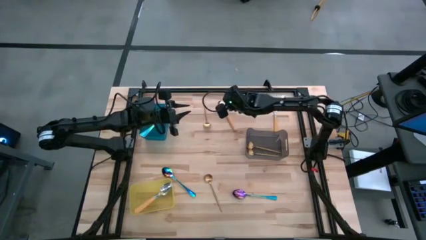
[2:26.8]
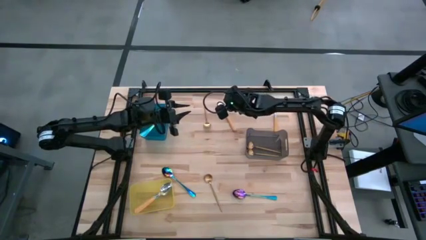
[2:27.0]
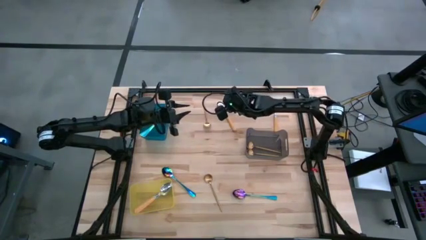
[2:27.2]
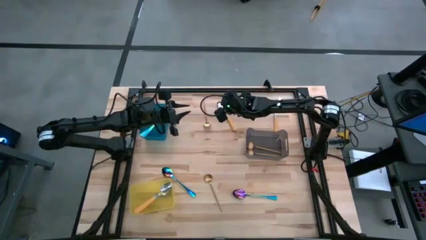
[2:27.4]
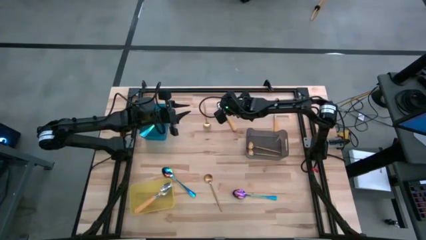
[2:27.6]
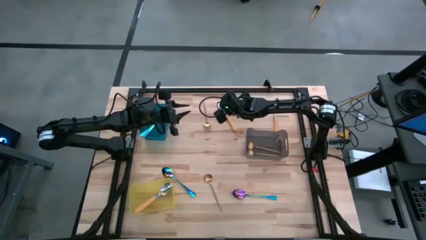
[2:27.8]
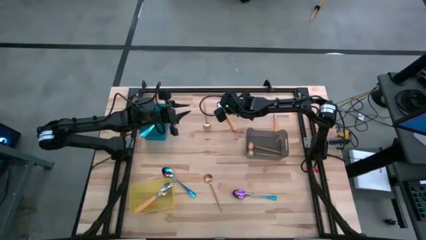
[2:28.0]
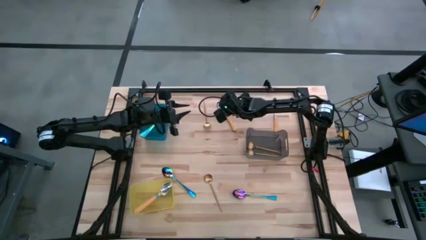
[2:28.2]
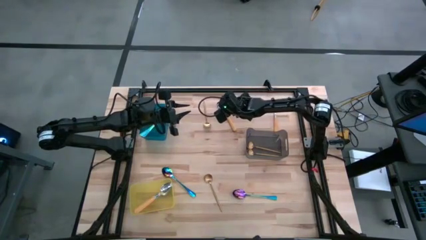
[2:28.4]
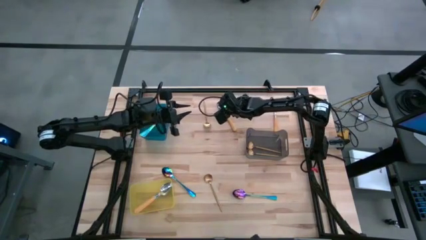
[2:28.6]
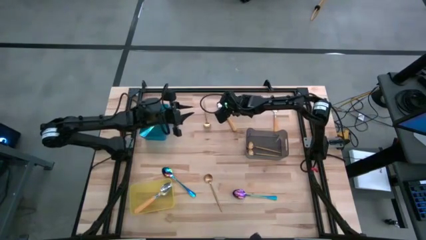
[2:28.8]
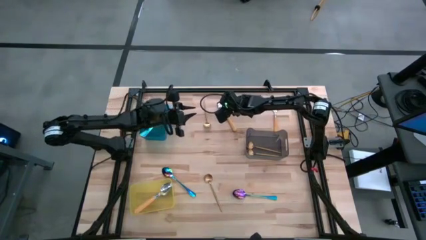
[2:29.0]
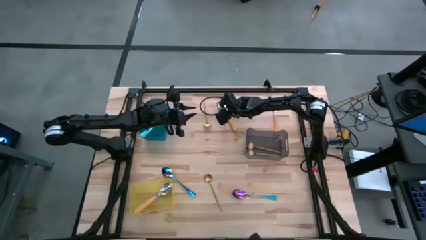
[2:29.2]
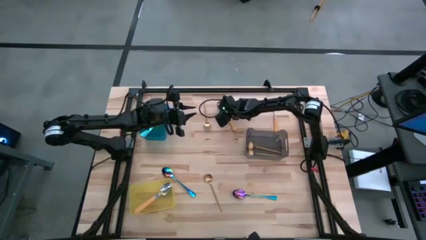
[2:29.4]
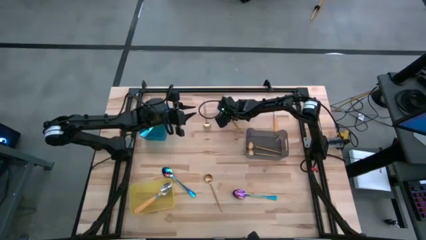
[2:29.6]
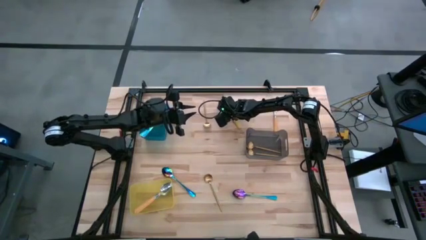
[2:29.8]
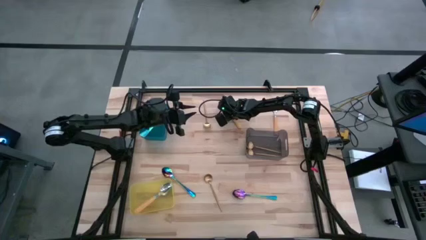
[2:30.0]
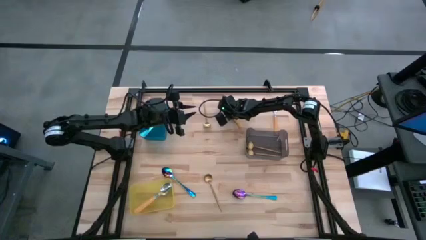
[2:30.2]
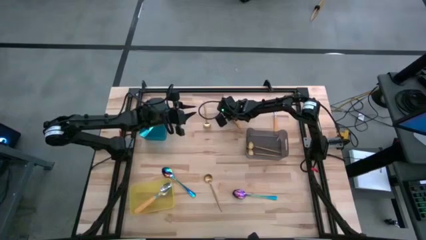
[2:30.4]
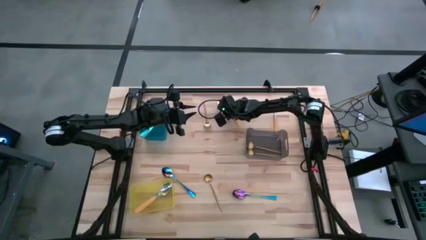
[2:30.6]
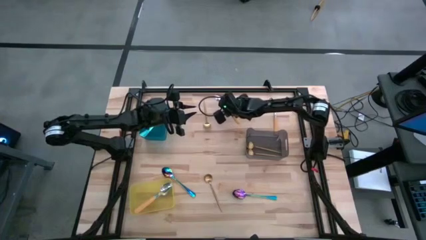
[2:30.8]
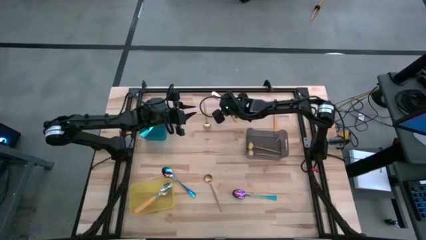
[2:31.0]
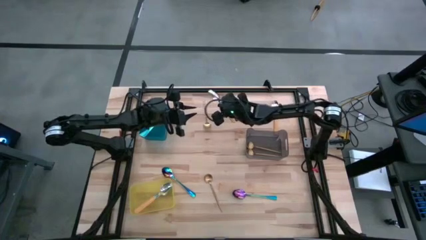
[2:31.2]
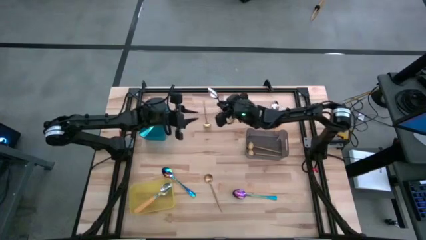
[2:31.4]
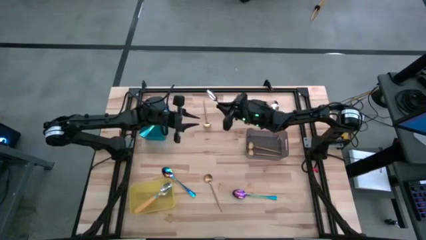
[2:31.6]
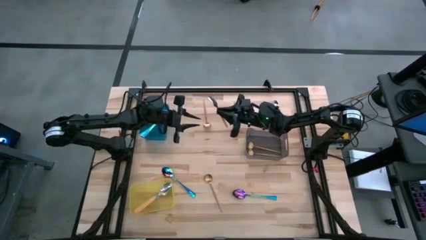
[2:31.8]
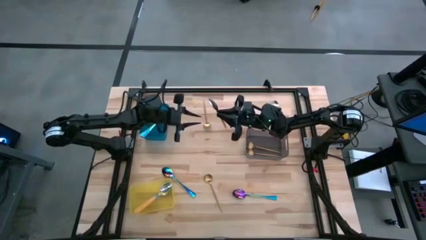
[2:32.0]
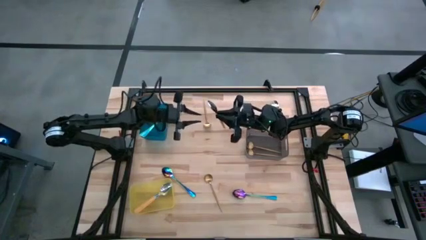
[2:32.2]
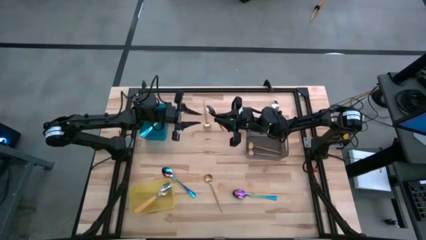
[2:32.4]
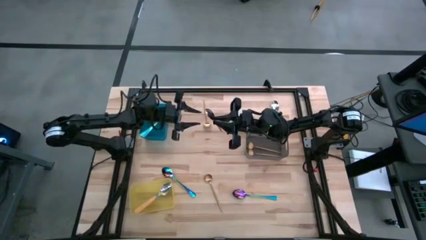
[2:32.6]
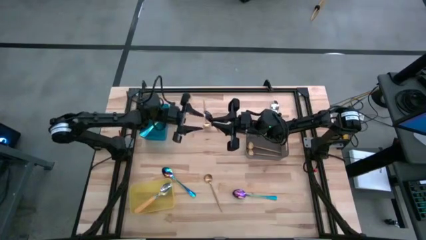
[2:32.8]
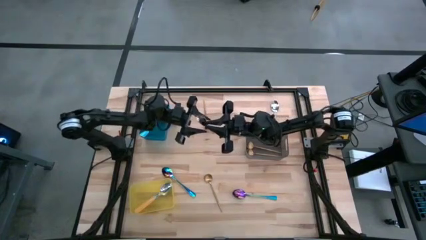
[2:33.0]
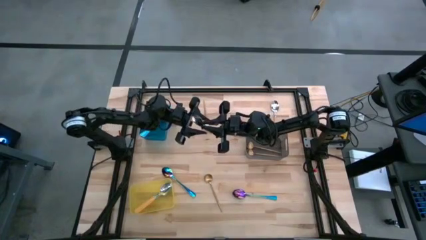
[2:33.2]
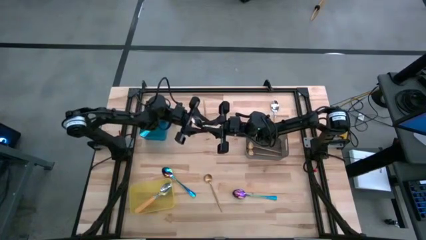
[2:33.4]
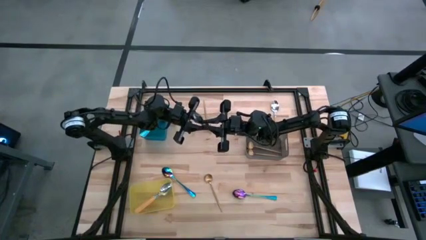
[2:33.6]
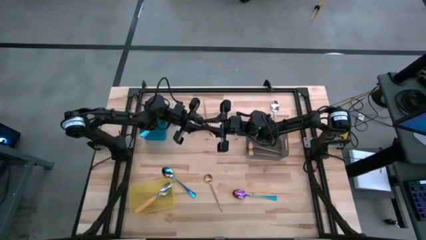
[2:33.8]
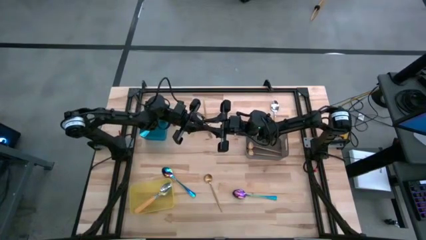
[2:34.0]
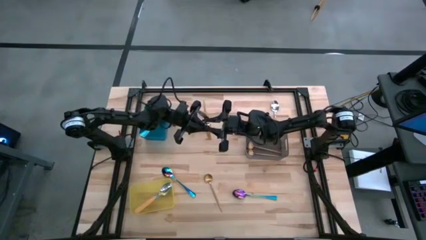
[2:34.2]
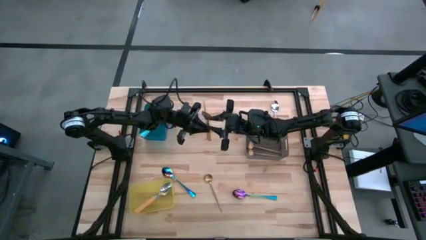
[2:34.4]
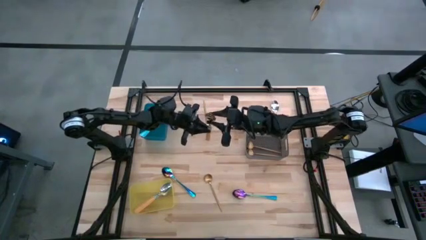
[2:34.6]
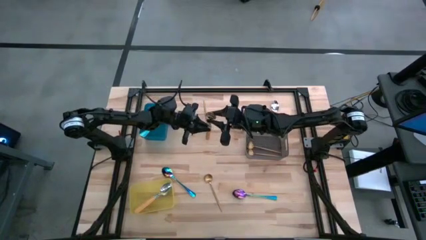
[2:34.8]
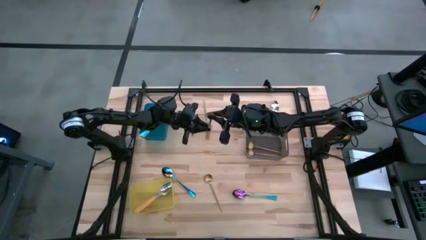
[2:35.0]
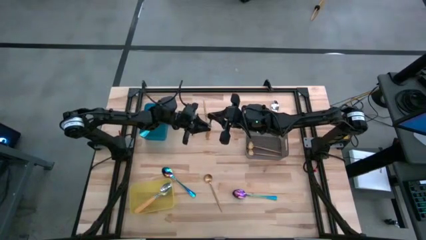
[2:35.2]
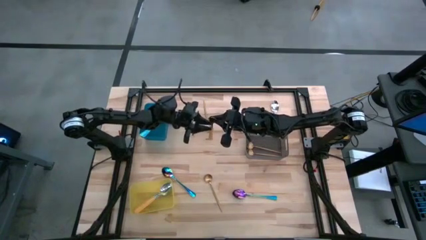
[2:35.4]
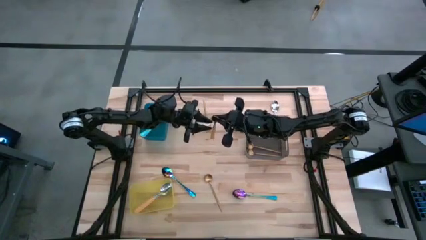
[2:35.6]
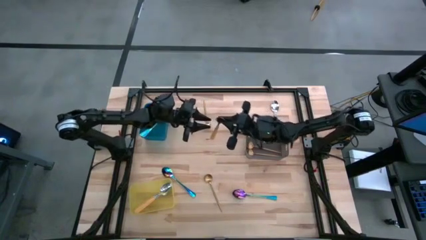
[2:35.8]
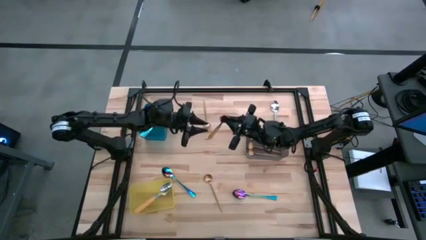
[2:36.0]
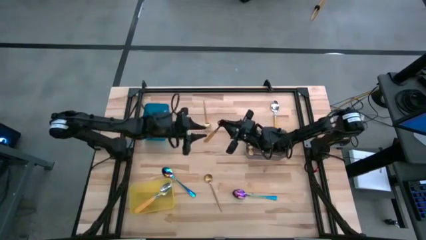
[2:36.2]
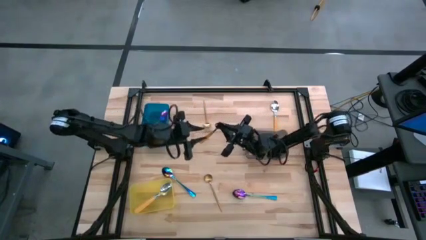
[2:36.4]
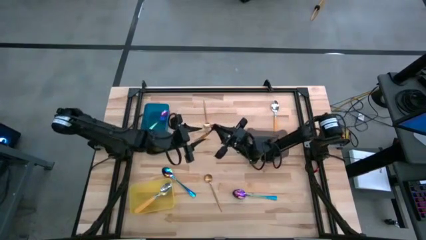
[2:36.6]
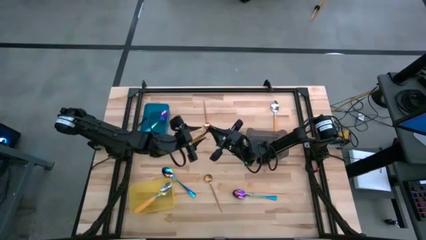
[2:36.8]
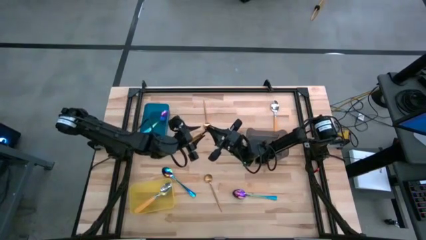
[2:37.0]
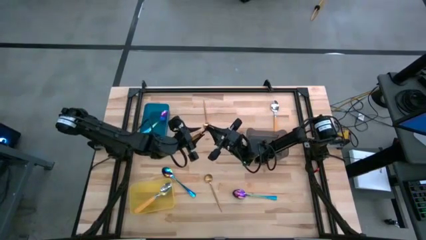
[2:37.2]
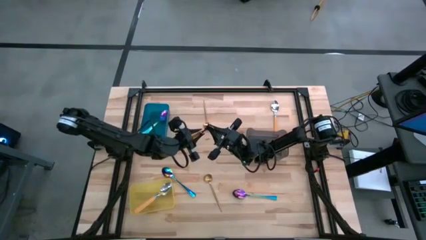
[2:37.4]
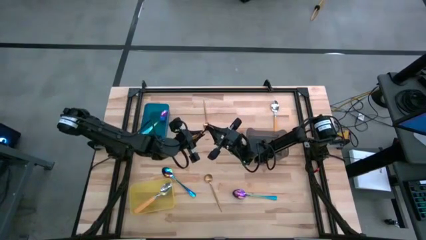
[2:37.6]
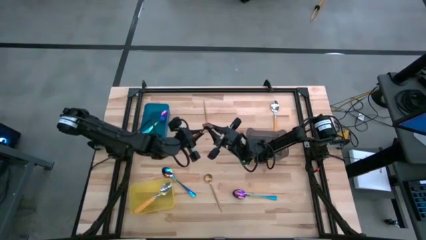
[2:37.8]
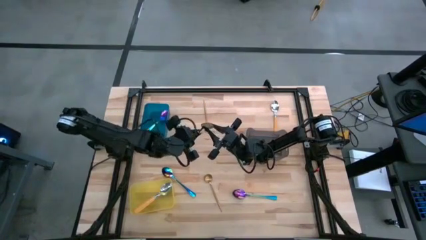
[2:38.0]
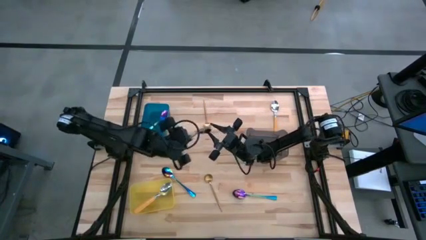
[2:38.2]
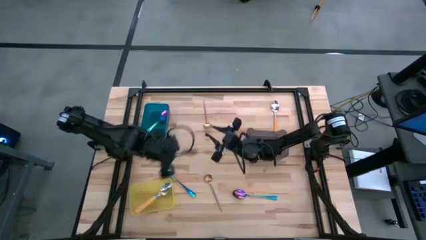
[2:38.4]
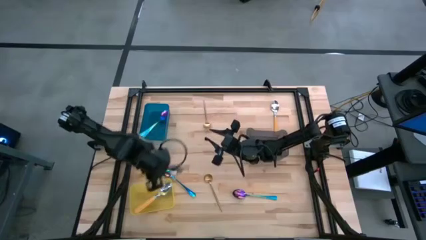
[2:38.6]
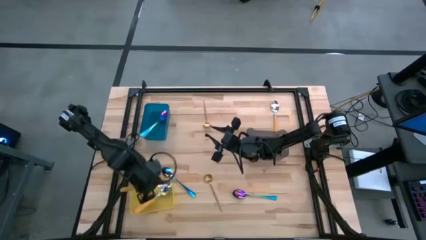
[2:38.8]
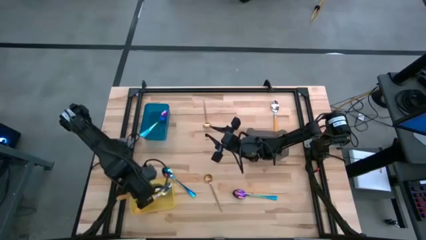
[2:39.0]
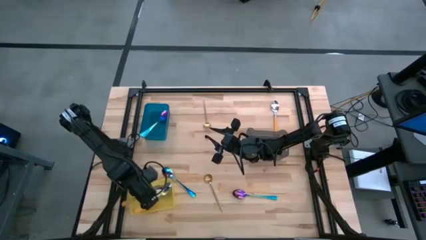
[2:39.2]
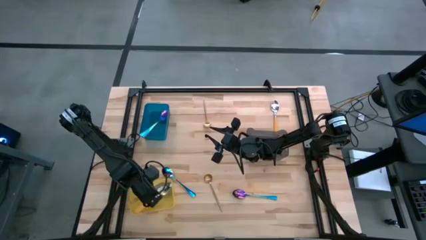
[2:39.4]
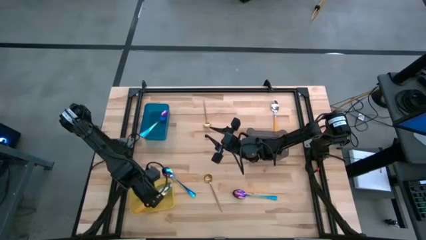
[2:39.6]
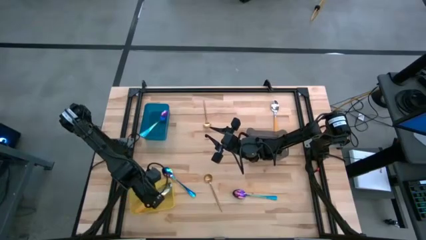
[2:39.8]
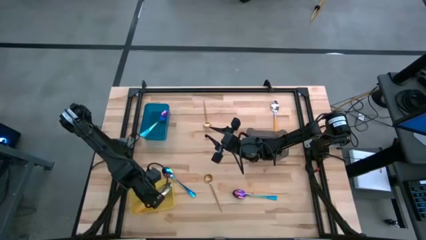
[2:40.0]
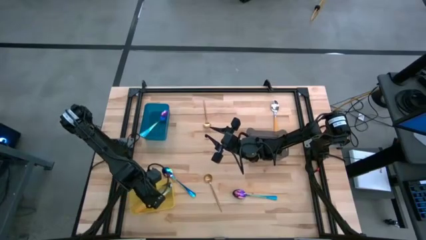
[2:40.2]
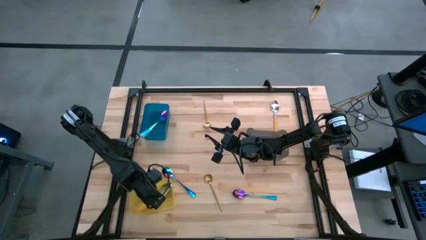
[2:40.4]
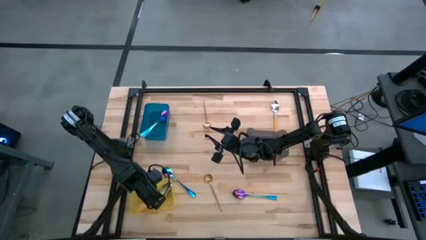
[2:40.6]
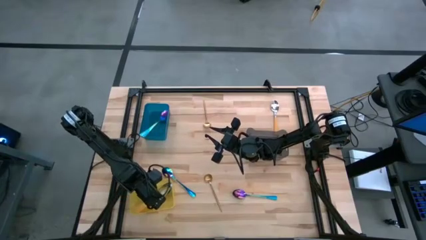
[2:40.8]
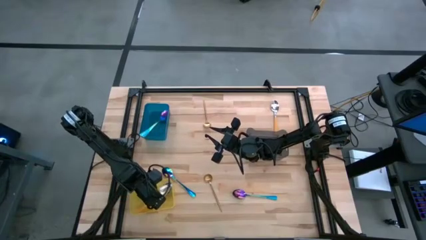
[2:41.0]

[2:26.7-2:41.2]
Task: Sort silverware by color (type)
Put the yellow spoon into the yellow bin

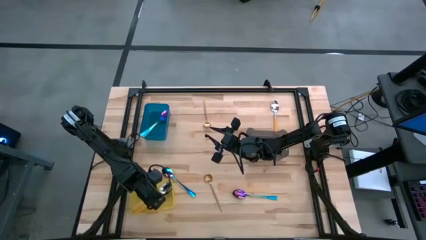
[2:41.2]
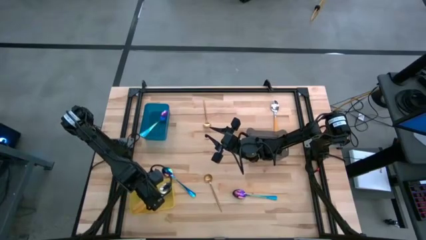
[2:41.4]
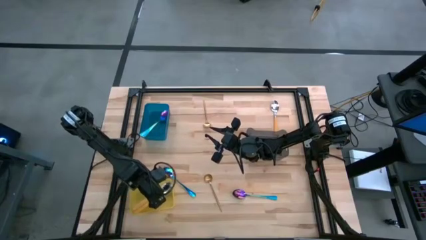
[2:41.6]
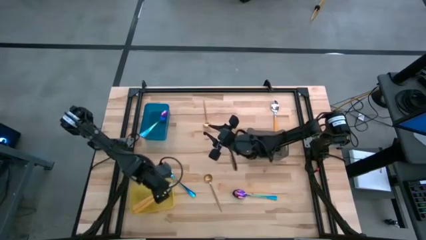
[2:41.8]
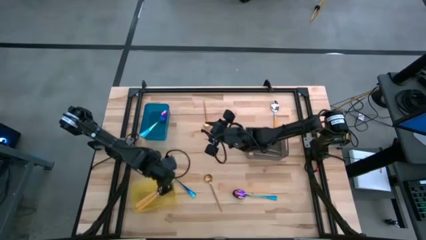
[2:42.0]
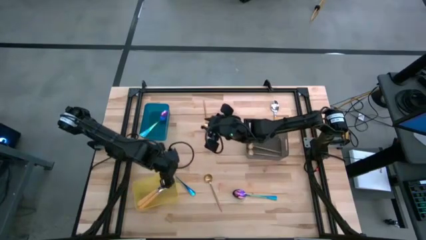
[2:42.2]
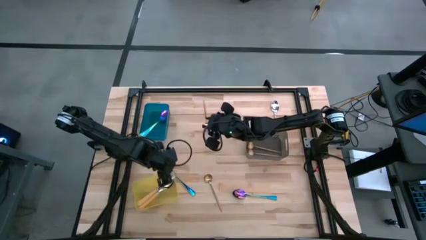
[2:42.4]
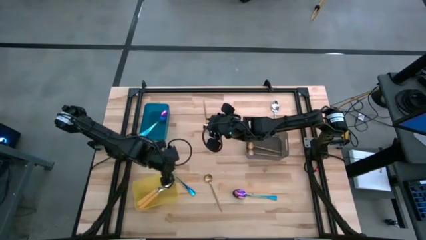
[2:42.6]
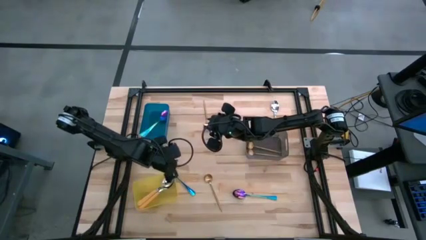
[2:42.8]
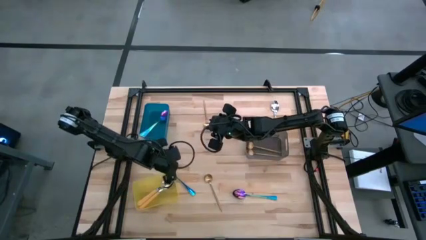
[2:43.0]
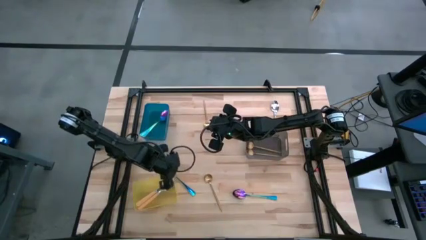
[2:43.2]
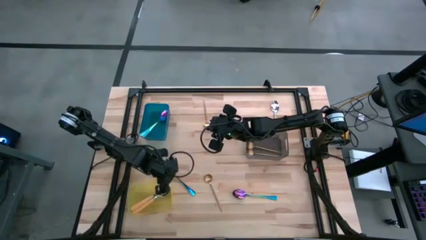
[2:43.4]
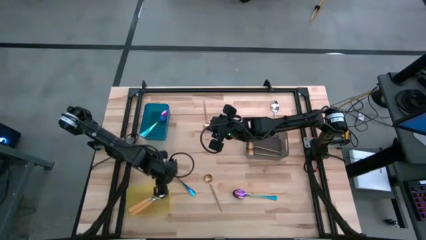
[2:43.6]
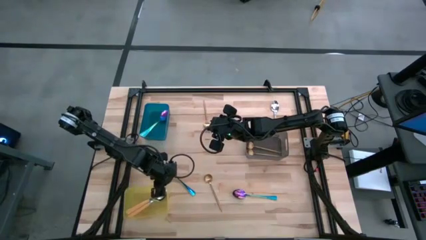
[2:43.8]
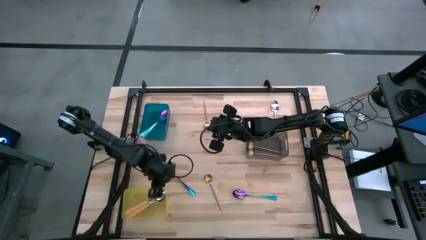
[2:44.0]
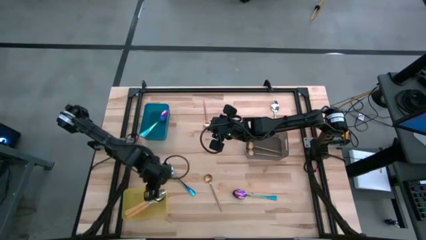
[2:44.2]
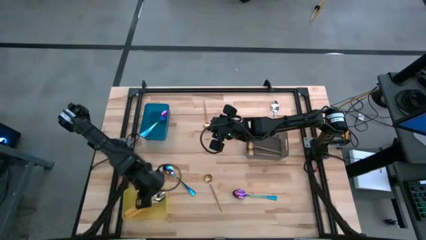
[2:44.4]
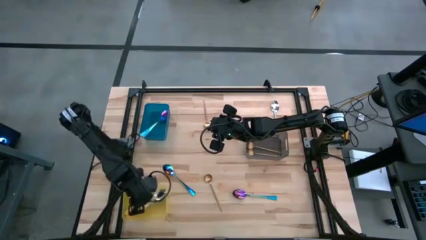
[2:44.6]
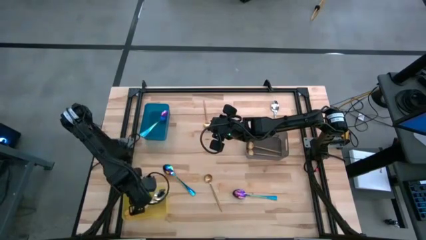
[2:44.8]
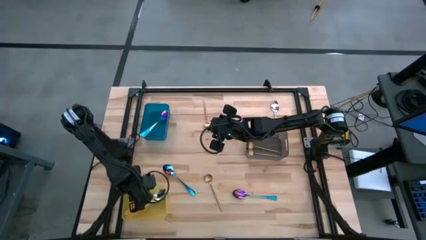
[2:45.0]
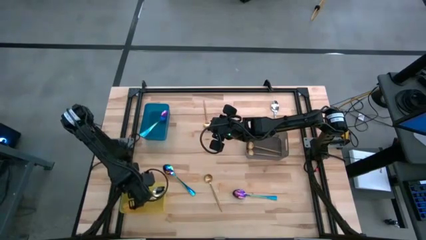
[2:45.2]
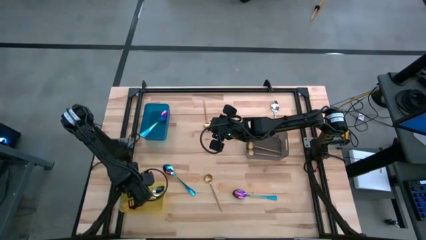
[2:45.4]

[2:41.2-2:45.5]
Put the yellow spoon into the yellow bin
